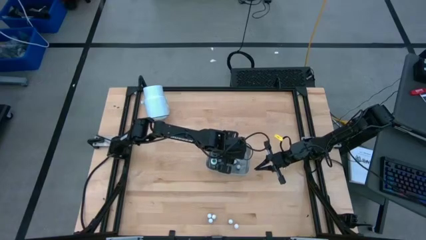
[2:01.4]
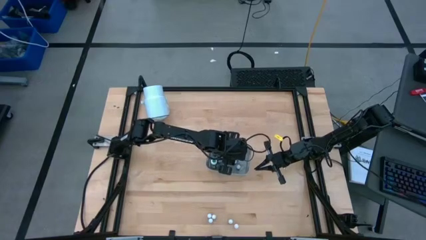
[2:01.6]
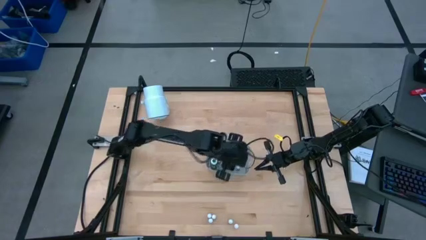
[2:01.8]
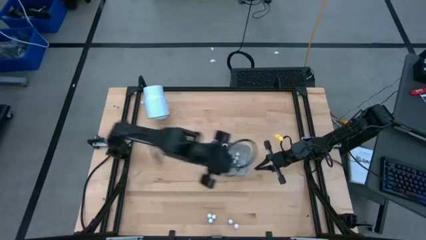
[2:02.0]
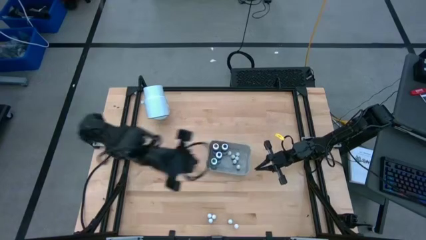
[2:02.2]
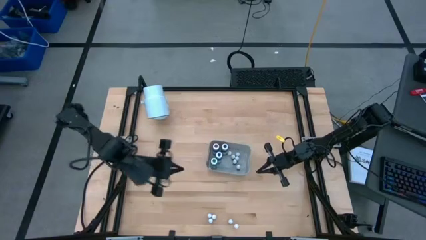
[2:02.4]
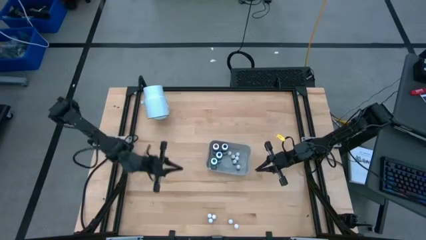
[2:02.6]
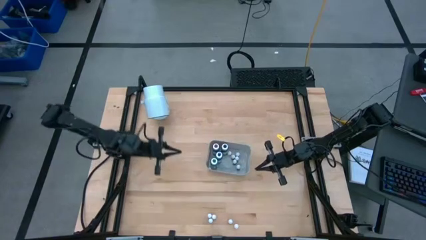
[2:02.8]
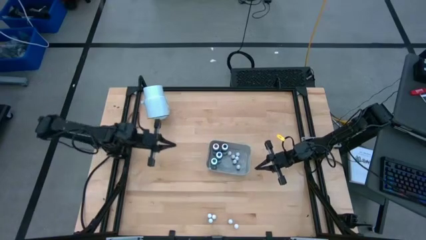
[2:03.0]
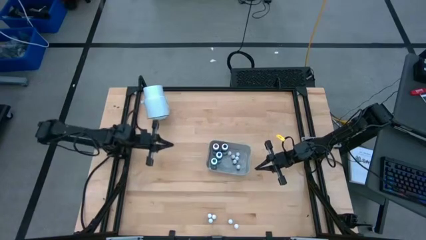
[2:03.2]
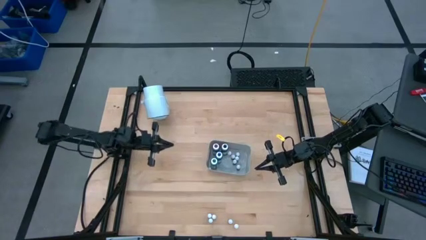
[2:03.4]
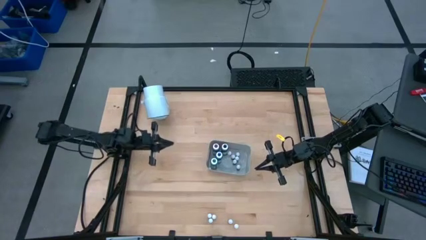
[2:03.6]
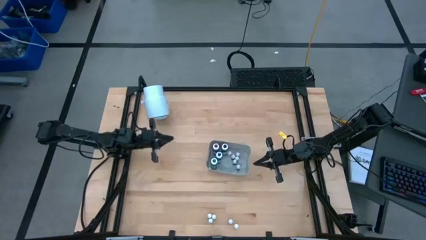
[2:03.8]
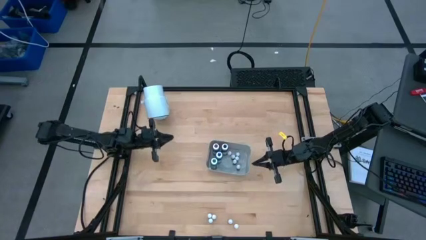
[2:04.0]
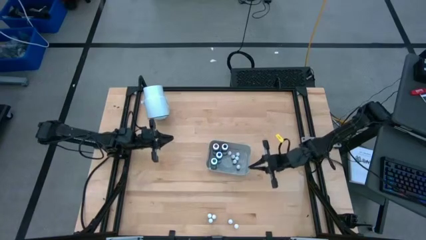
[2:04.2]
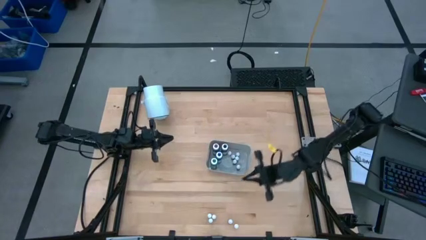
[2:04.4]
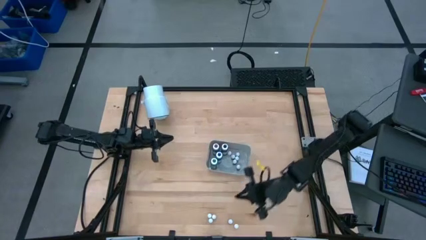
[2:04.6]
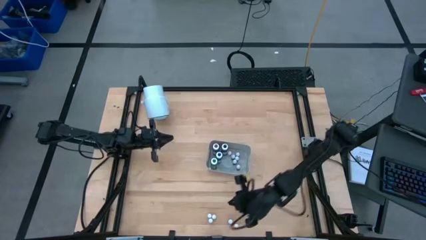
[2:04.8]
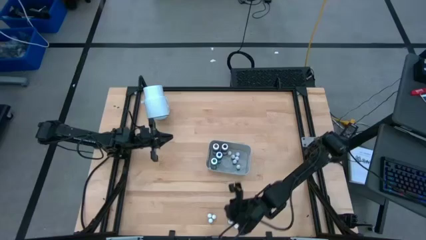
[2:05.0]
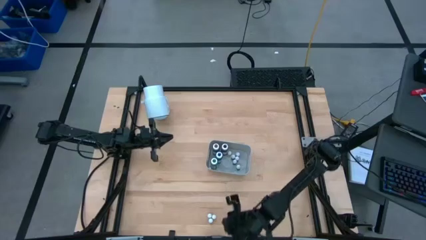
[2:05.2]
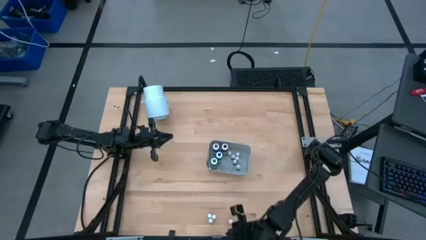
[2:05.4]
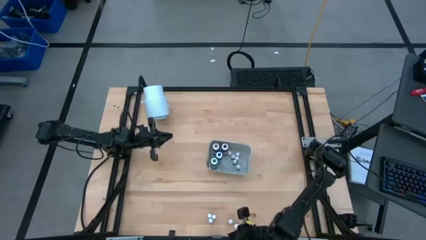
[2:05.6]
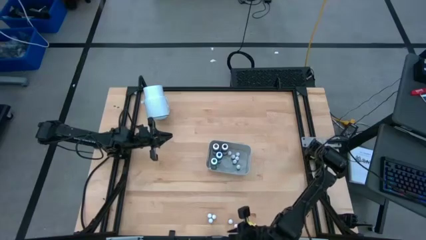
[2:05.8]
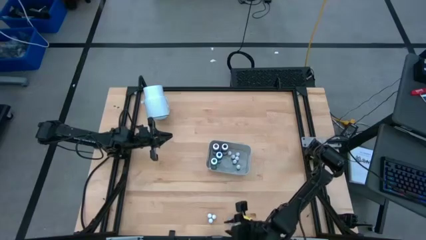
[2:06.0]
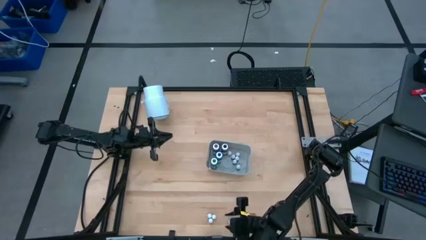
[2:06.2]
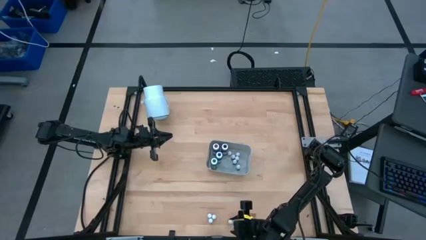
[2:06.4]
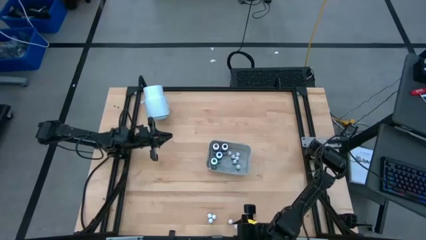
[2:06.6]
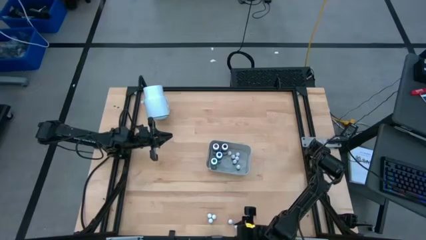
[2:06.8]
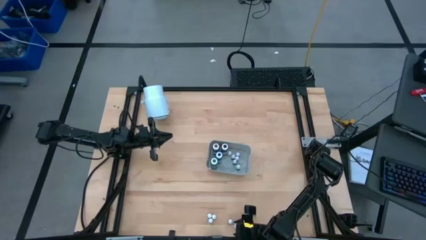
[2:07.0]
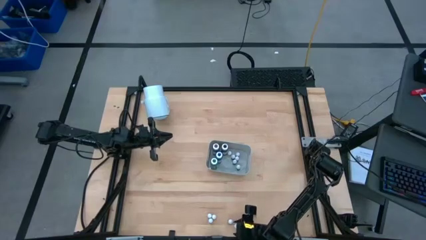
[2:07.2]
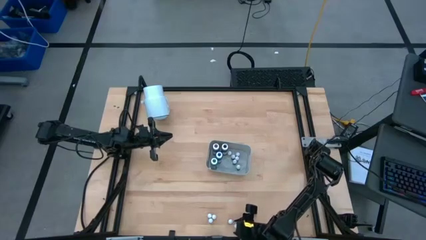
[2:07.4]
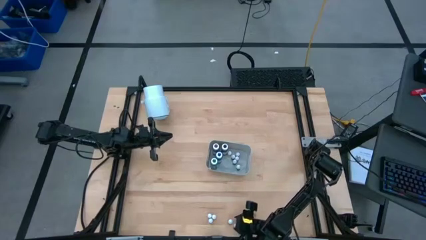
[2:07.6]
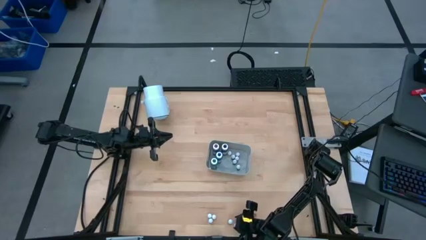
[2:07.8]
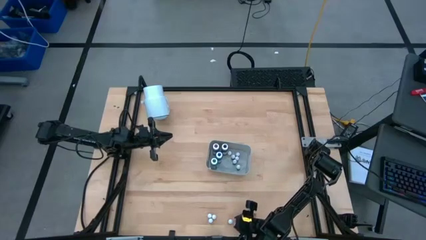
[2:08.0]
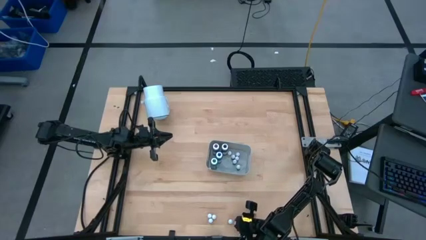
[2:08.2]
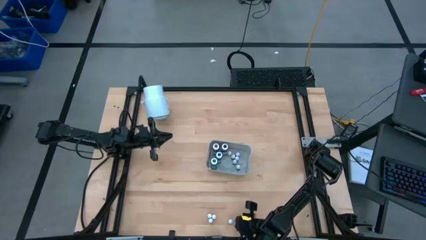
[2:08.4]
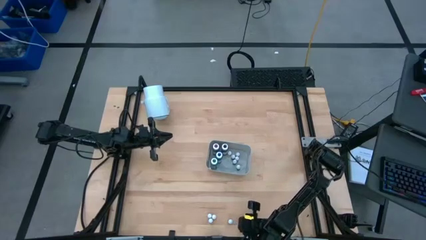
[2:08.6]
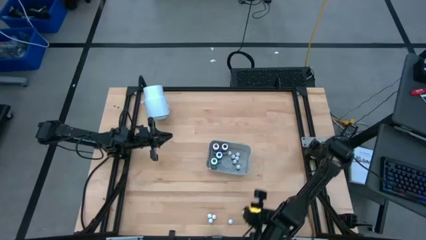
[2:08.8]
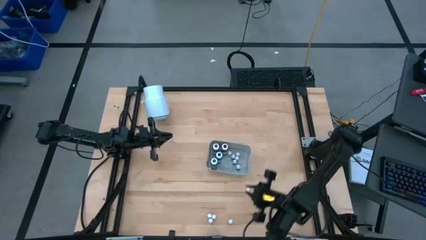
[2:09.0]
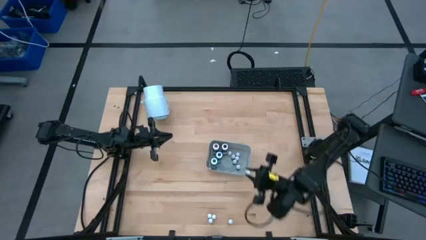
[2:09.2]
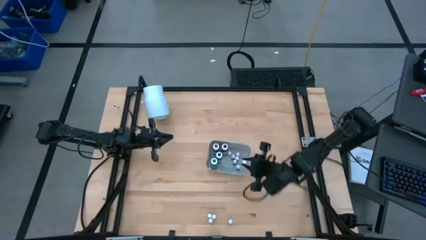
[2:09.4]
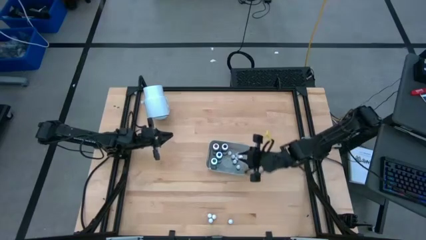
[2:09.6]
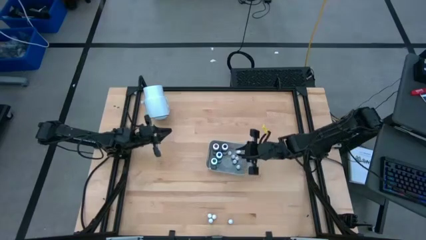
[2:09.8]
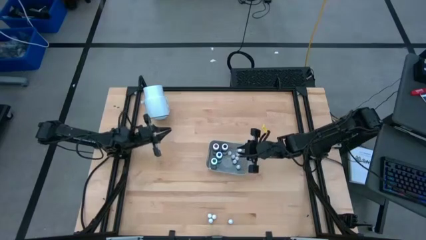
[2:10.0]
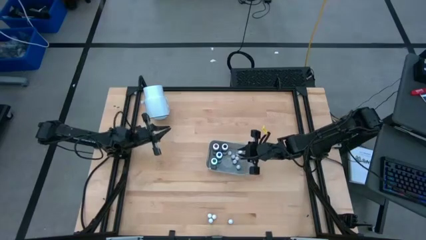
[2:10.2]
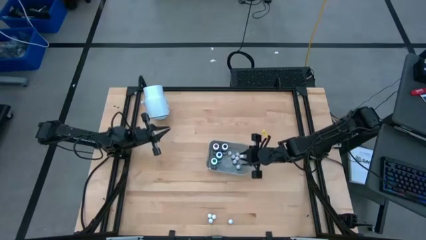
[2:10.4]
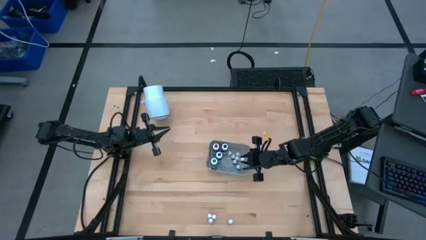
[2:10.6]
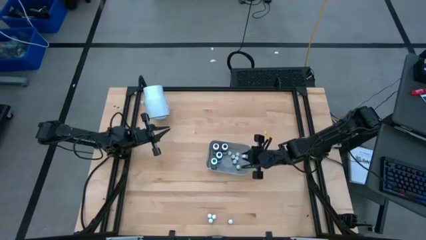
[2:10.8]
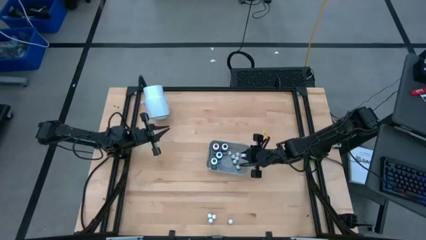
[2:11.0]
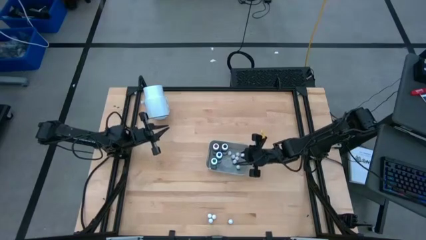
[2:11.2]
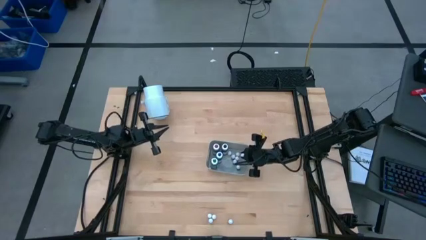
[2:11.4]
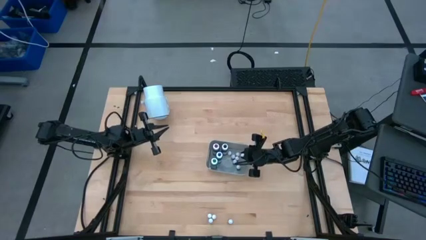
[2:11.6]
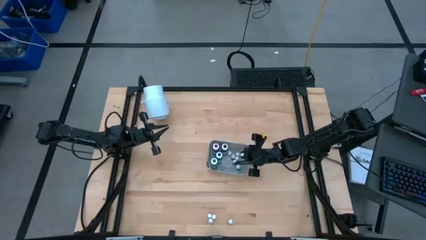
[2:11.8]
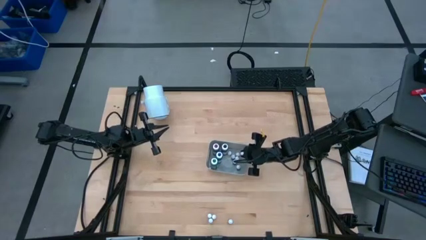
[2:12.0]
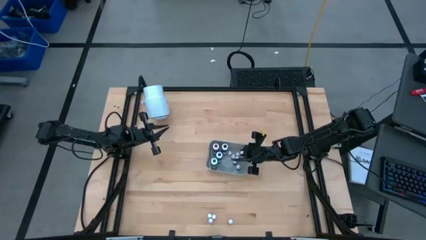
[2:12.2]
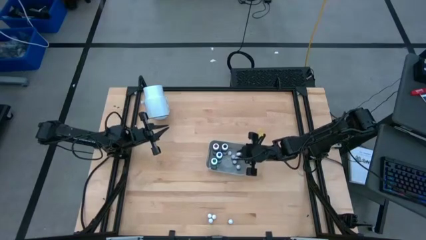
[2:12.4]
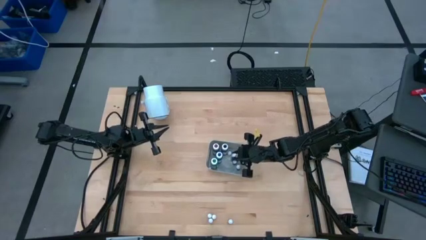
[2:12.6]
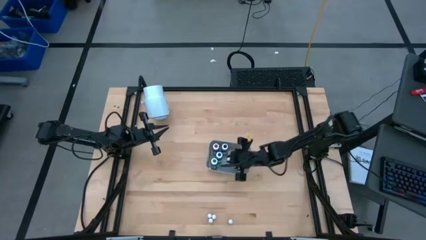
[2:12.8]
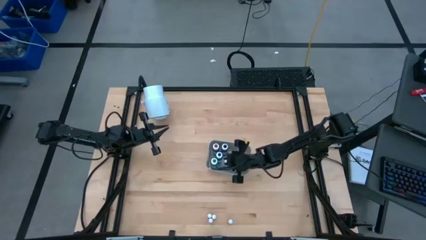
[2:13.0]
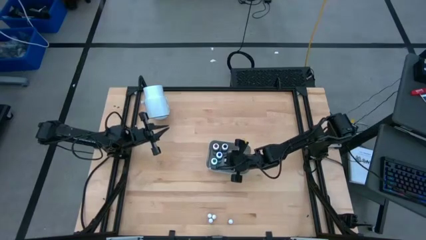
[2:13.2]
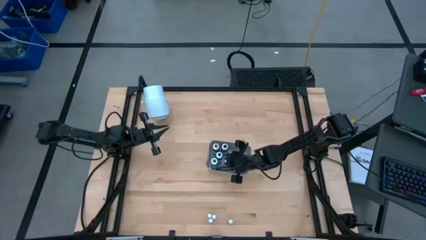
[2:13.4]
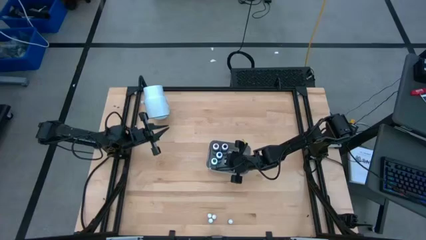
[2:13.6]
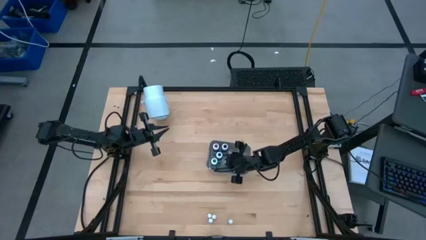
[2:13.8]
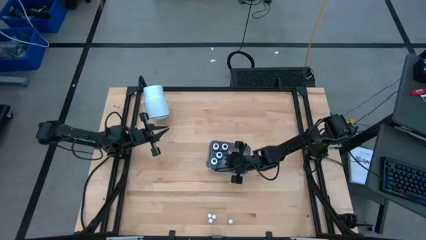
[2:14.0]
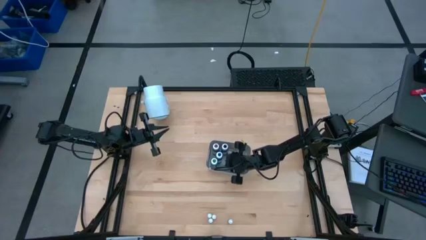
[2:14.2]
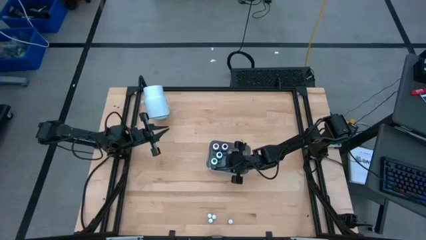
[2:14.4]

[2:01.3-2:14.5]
Task: Pick & Place food coloring
Put the small orange food coloring bottle into the bin

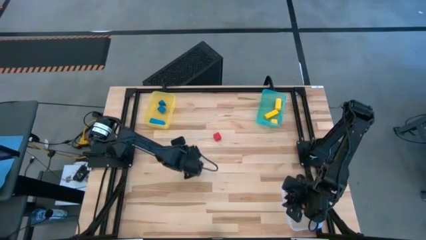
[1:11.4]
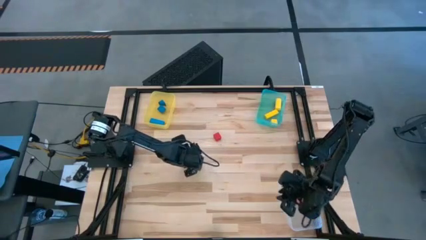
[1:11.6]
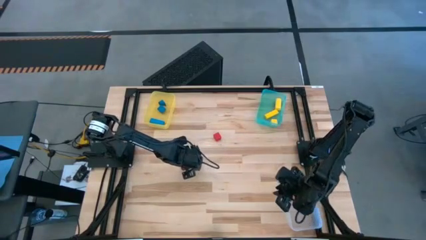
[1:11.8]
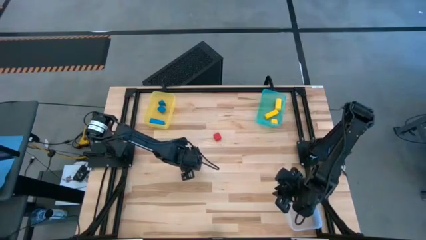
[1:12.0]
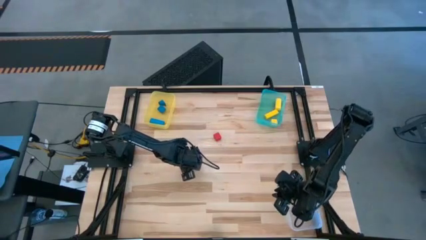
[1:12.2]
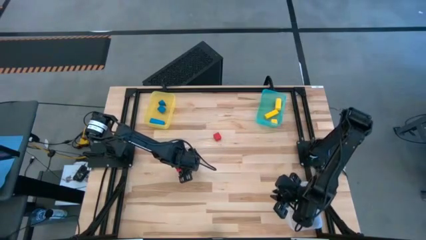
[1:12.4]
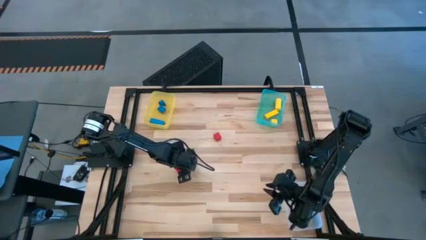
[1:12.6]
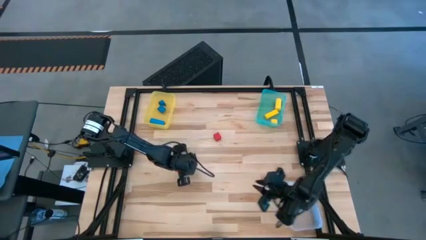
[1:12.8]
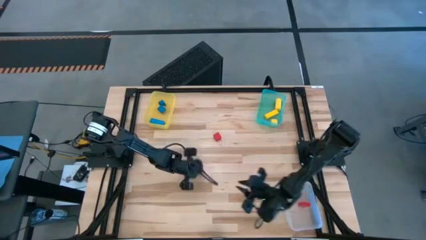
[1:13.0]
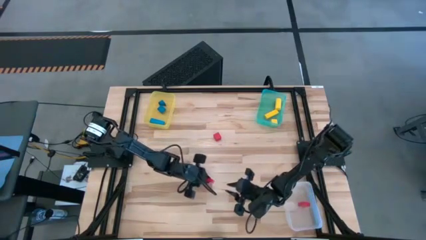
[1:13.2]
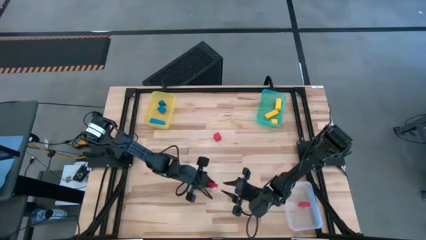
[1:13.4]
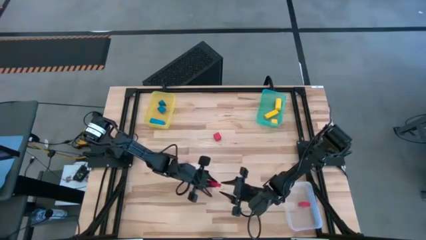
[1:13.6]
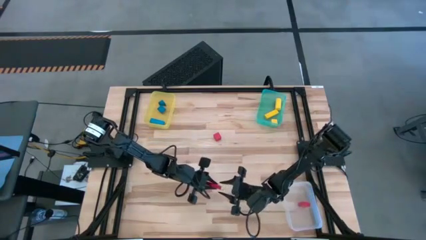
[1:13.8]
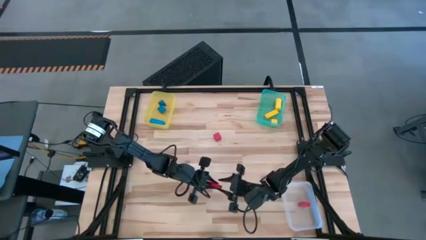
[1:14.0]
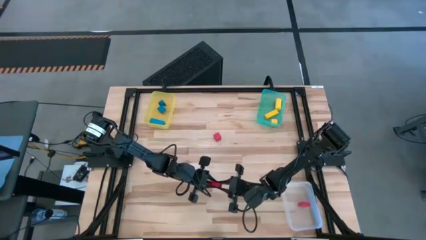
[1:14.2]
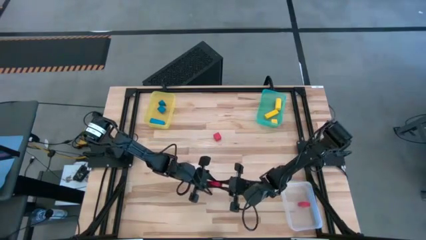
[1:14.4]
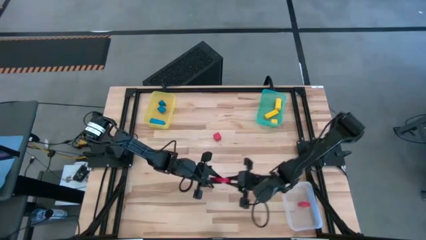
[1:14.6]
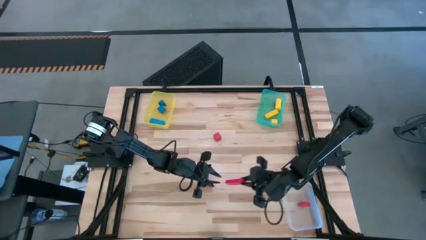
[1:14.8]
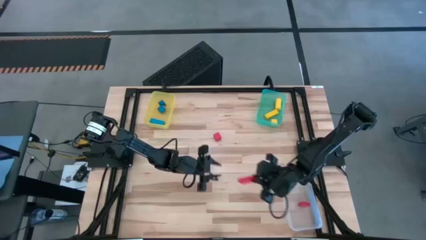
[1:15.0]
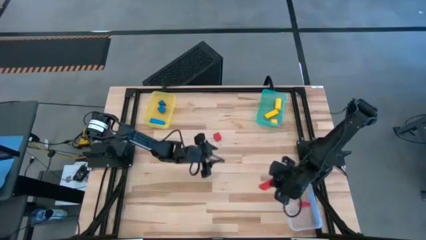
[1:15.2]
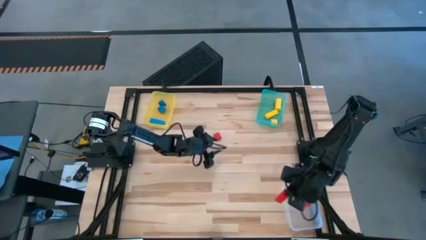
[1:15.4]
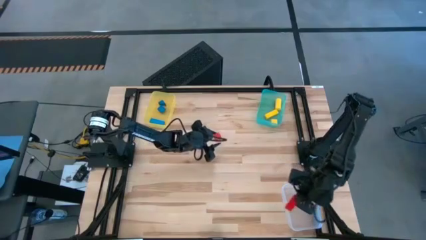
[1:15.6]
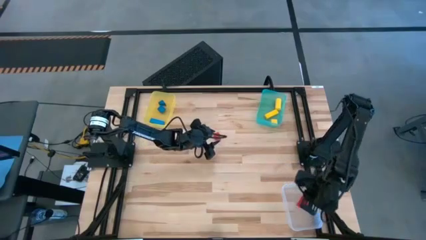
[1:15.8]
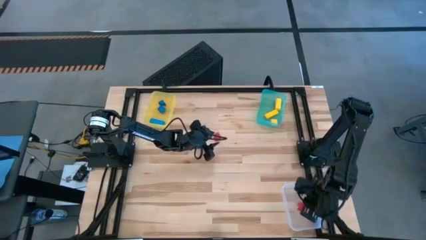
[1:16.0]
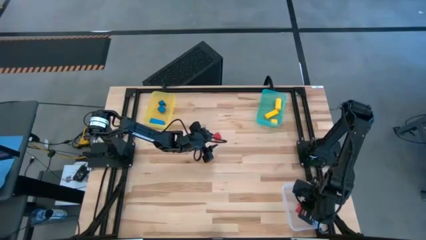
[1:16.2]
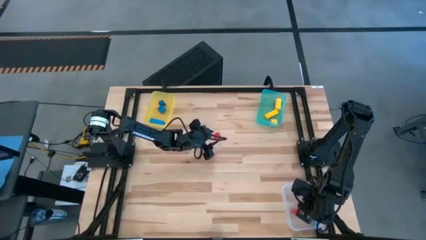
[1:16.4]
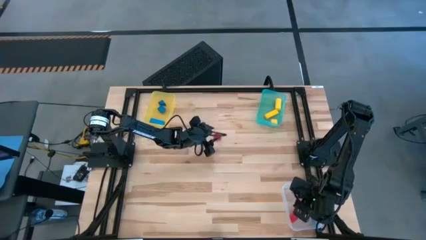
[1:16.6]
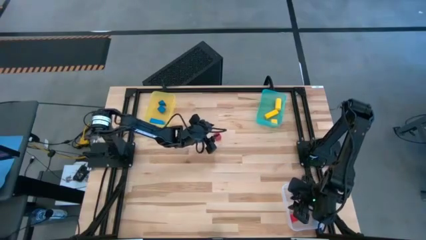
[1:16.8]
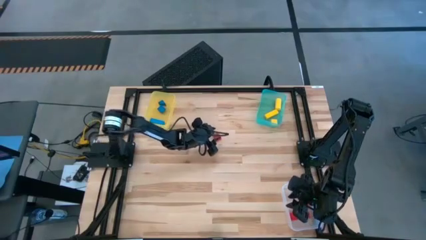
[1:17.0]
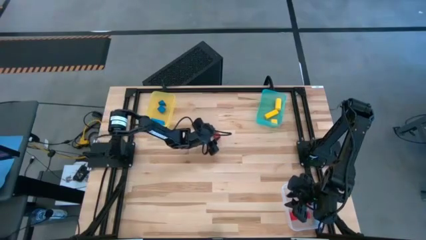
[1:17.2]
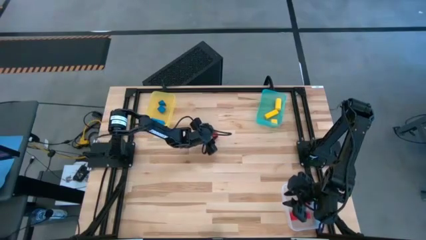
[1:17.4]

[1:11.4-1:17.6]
Task: Sort & place blocks by color
Put the red rectangle game block into the white transparent bin
